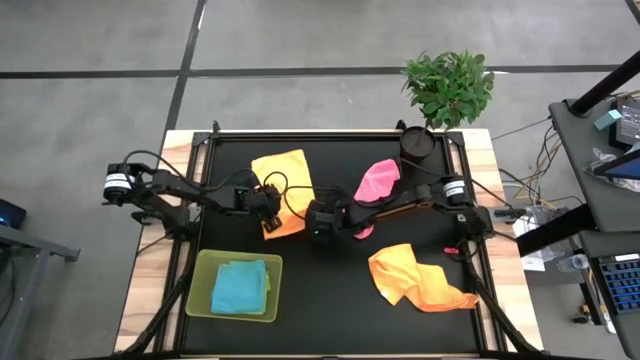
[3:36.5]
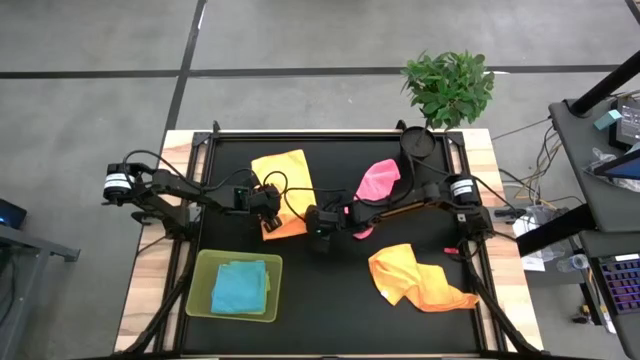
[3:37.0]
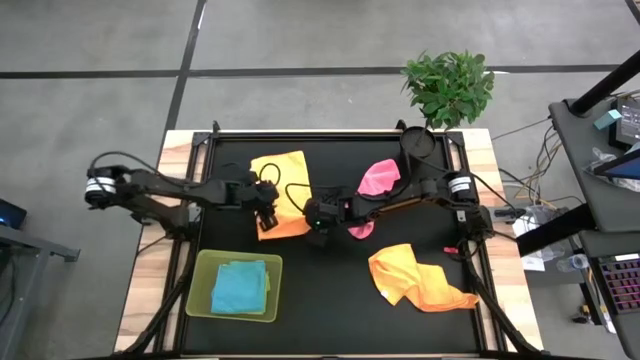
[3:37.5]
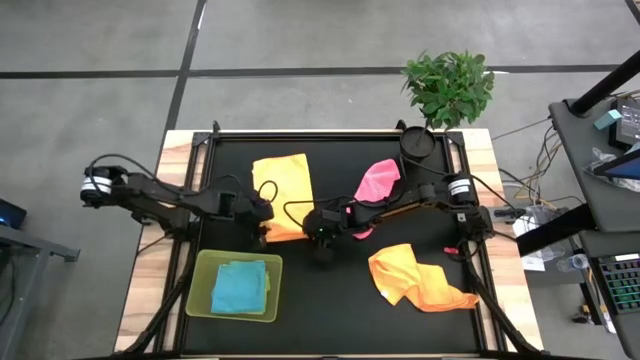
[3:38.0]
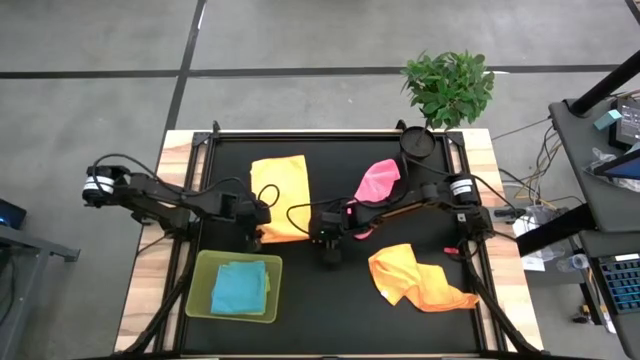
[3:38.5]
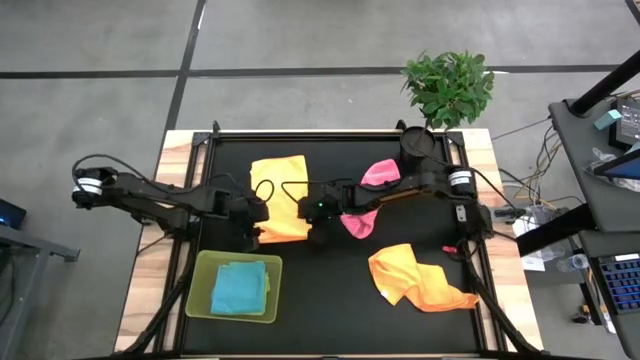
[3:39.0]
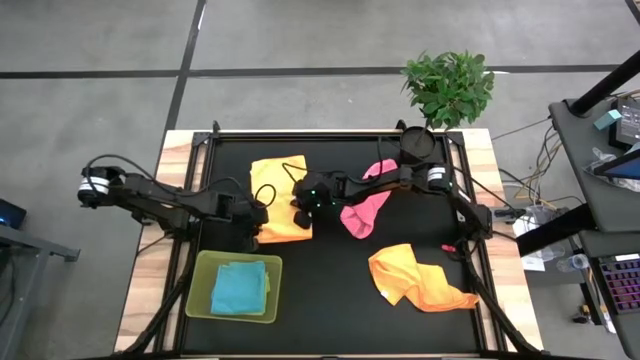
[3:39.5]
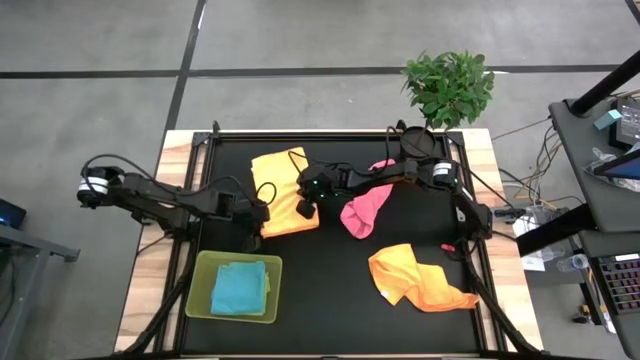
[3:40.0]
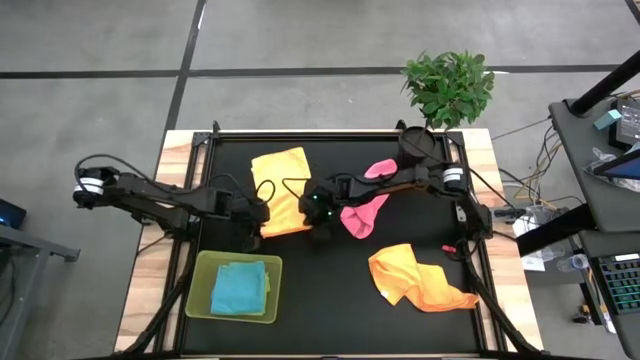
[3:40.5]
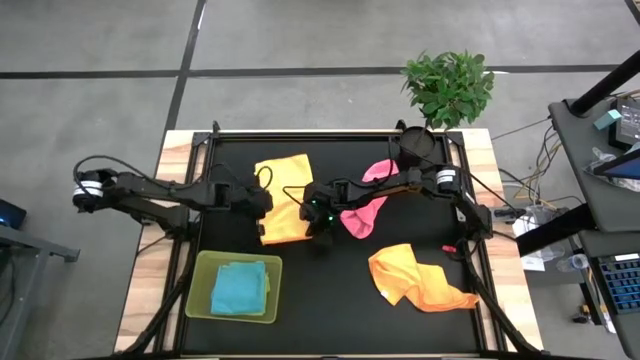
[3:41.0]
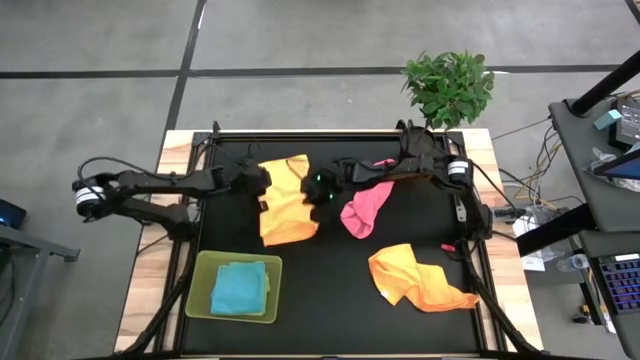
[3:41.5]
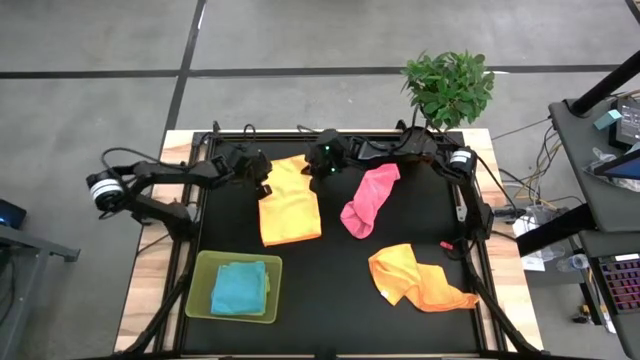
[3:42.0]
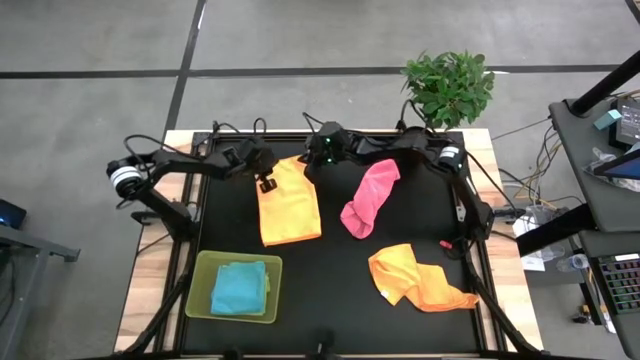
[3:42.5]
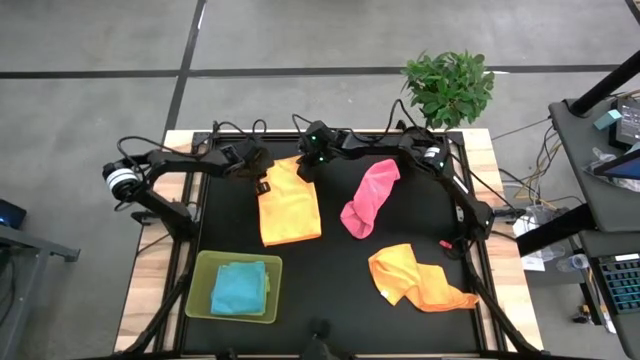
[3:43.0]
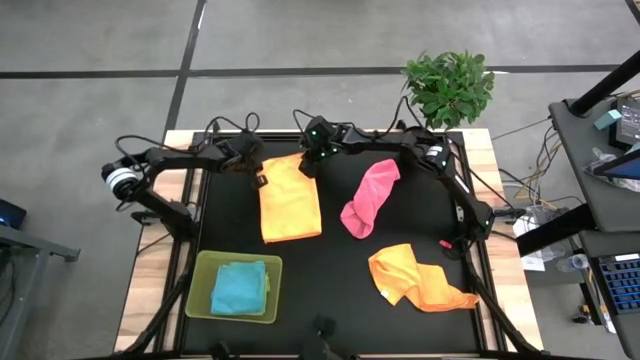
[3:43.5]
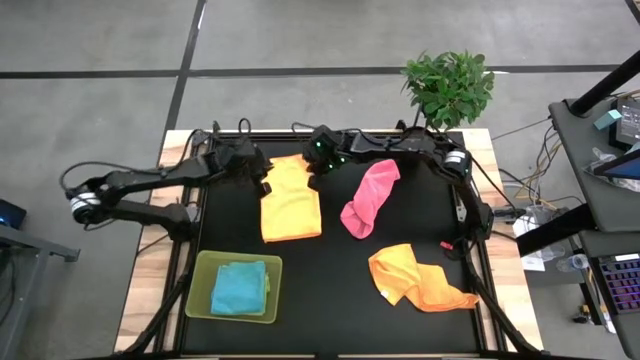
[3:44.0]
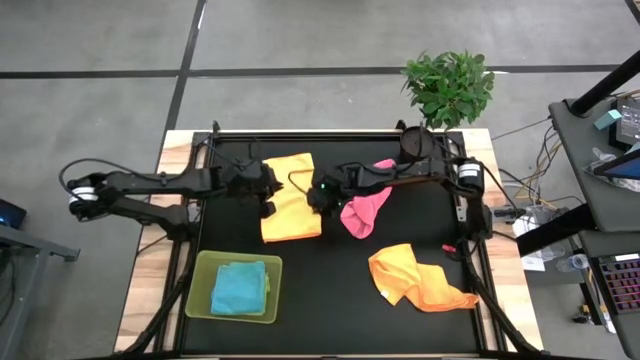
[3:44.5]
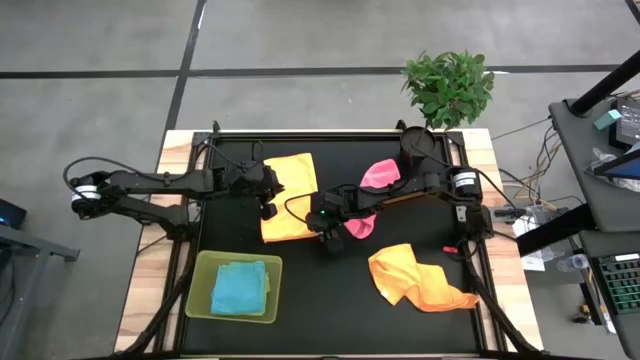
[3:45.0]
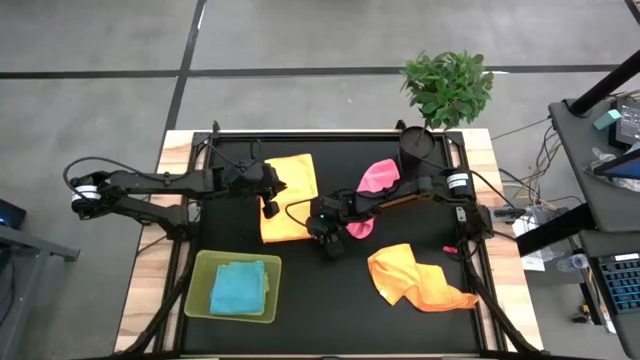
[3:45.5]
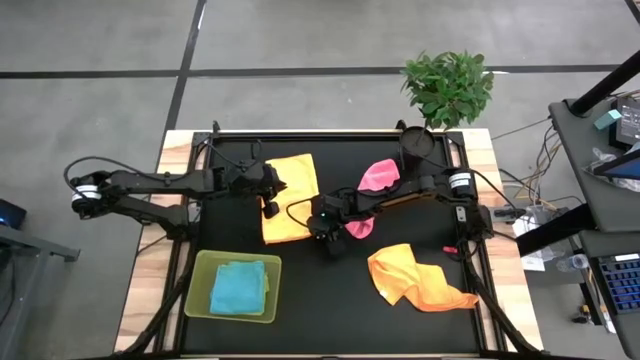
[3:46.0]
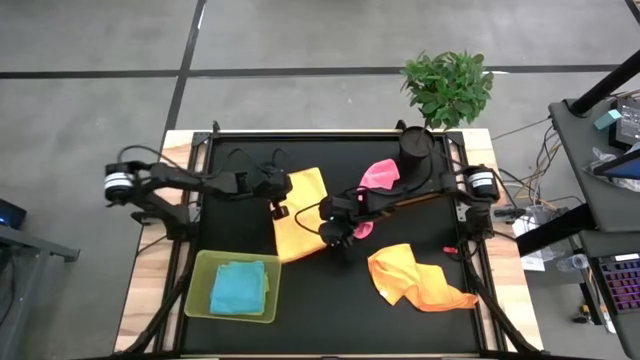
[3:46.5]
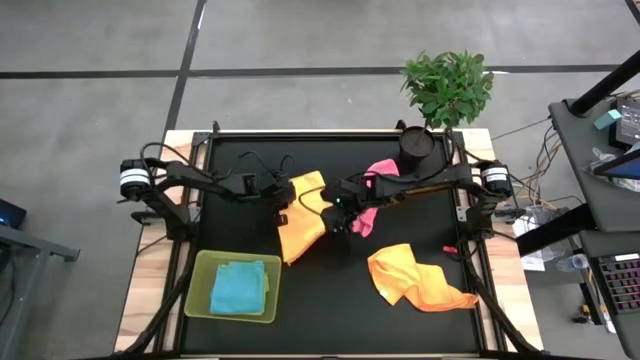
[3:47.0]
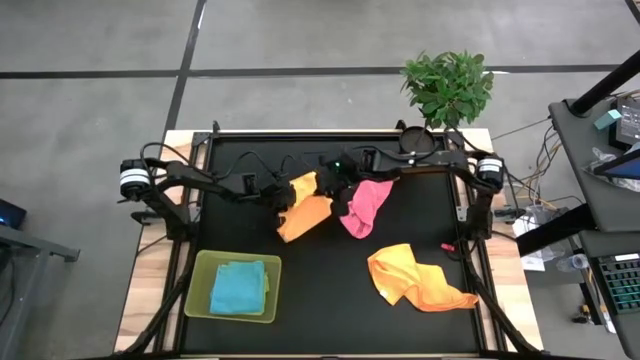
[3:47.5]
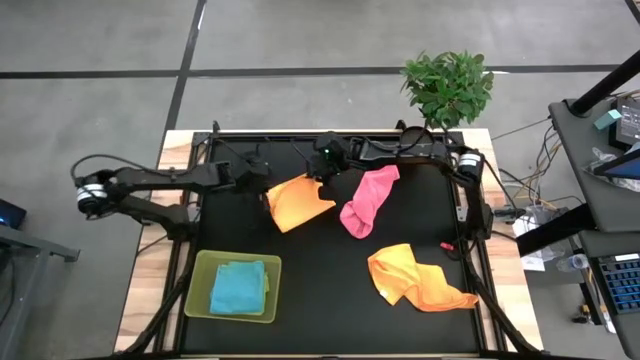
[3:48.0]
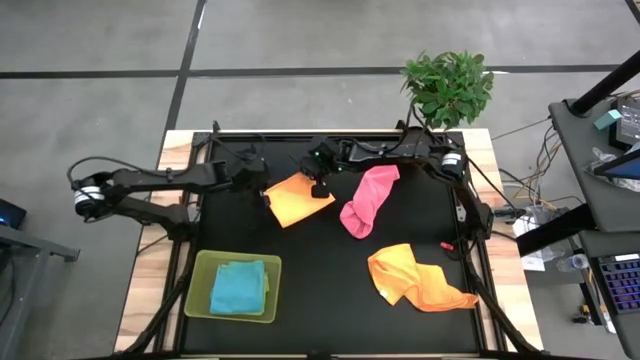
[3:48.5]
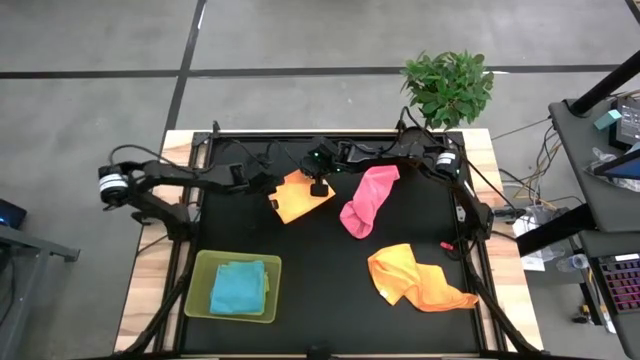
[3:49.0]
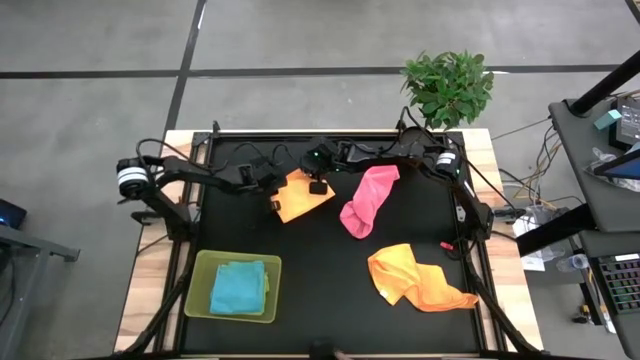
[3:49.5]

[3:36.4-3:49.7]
Task: Fold microfiber towels
Fold the top orange microfiber towel

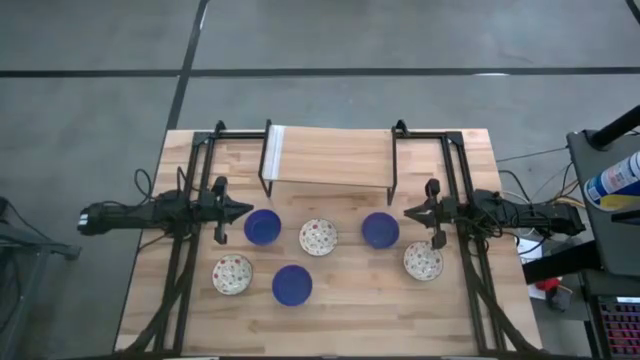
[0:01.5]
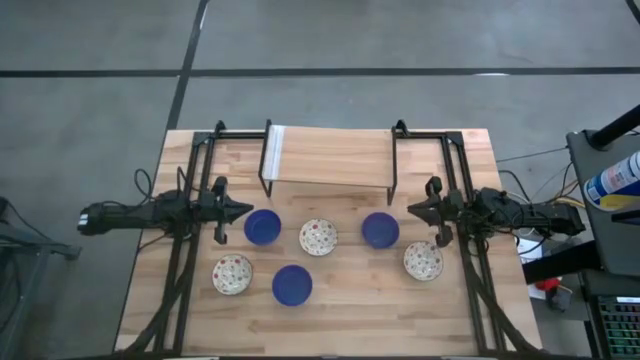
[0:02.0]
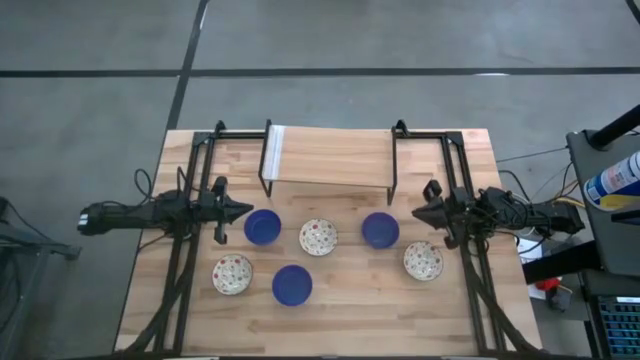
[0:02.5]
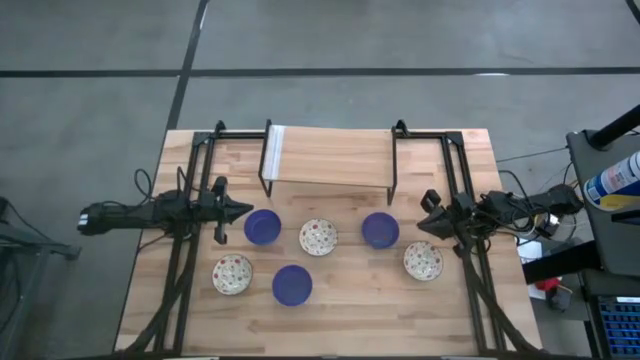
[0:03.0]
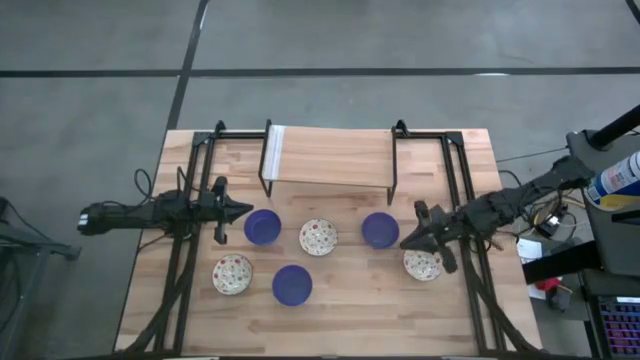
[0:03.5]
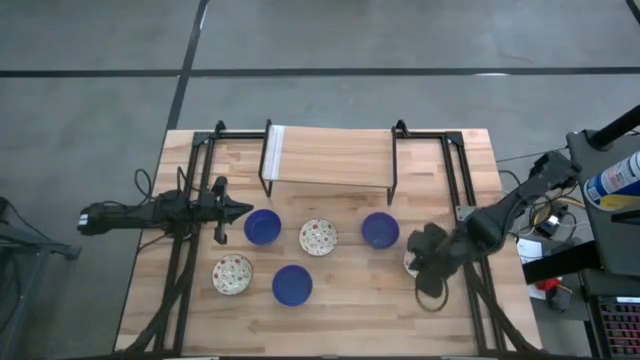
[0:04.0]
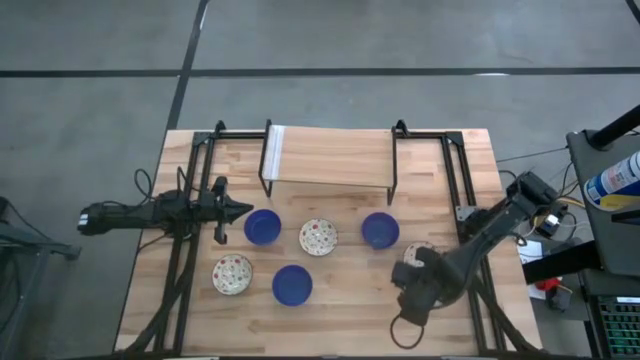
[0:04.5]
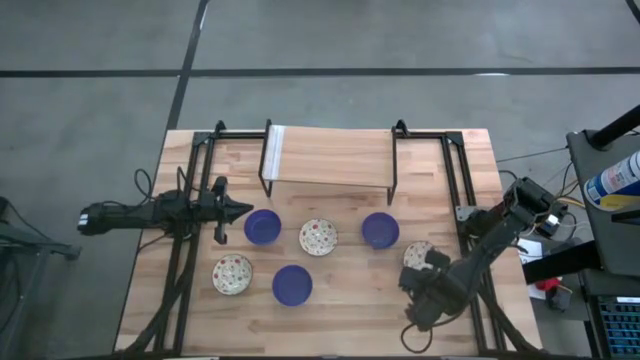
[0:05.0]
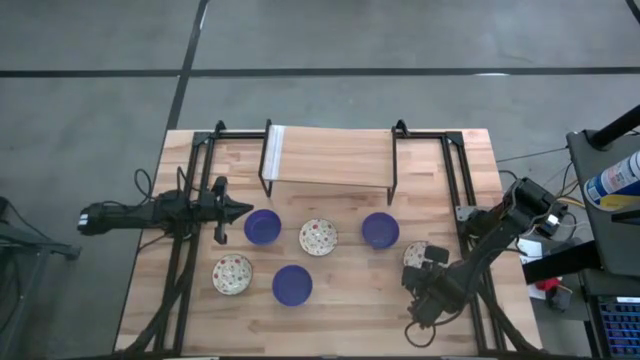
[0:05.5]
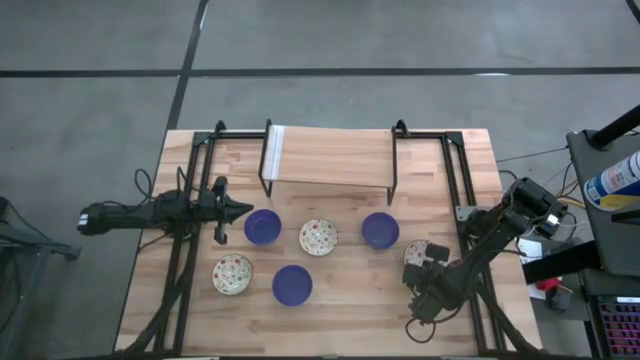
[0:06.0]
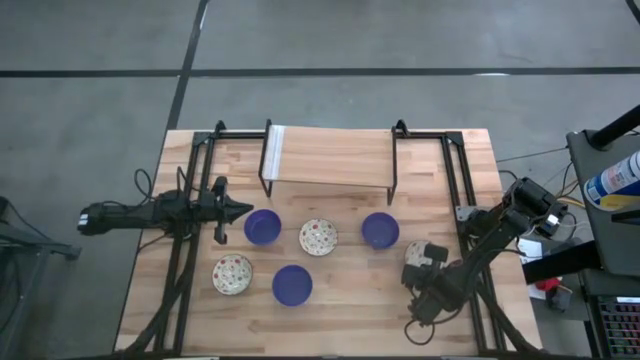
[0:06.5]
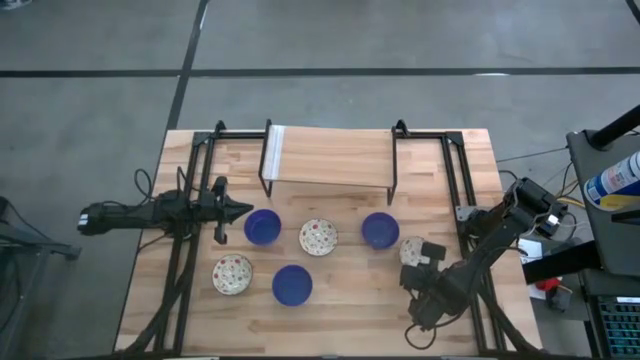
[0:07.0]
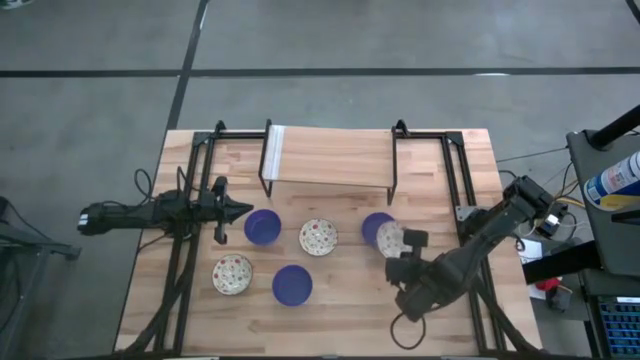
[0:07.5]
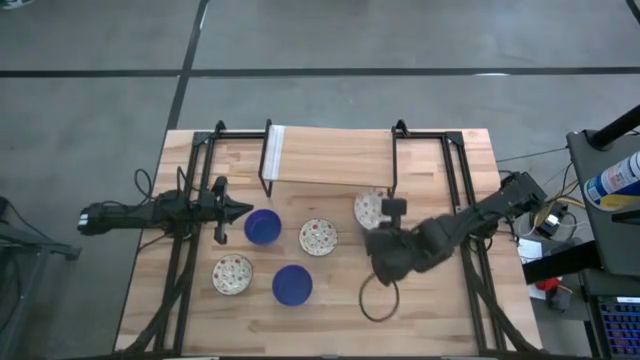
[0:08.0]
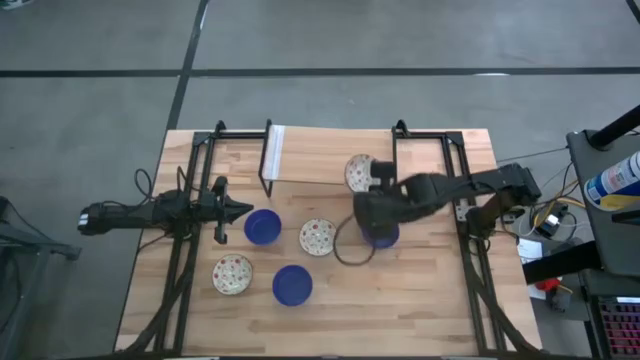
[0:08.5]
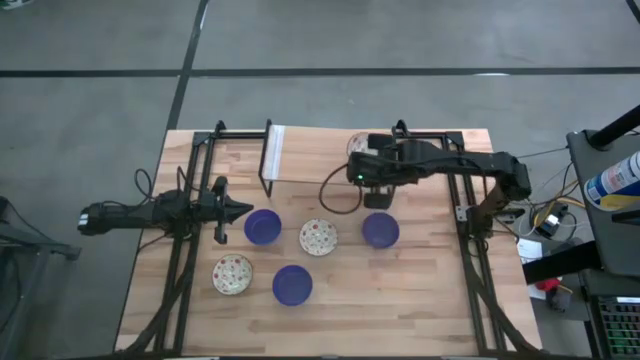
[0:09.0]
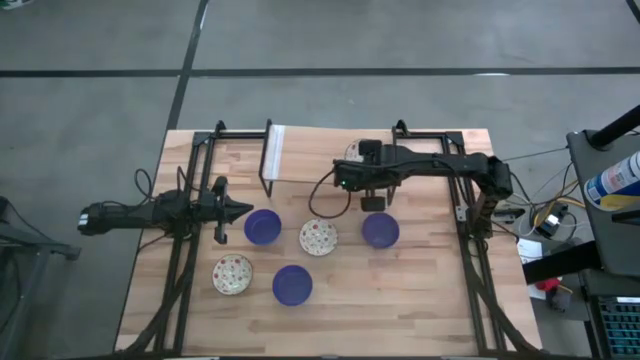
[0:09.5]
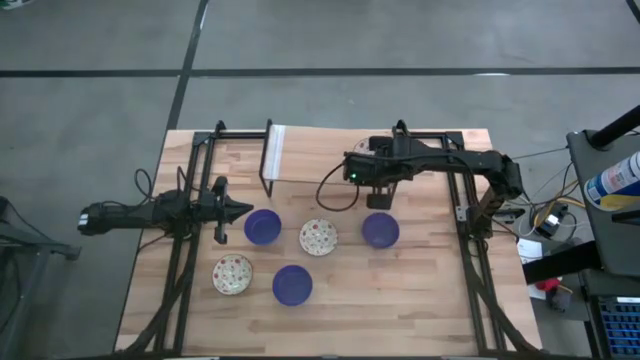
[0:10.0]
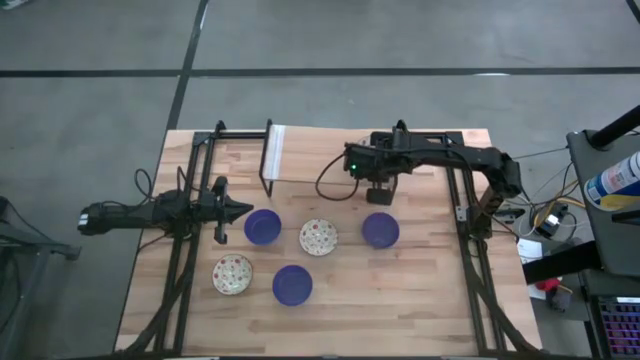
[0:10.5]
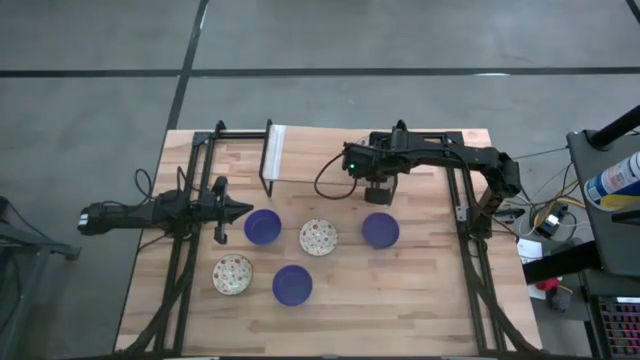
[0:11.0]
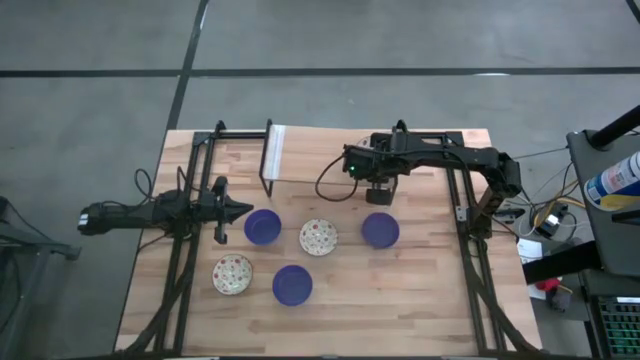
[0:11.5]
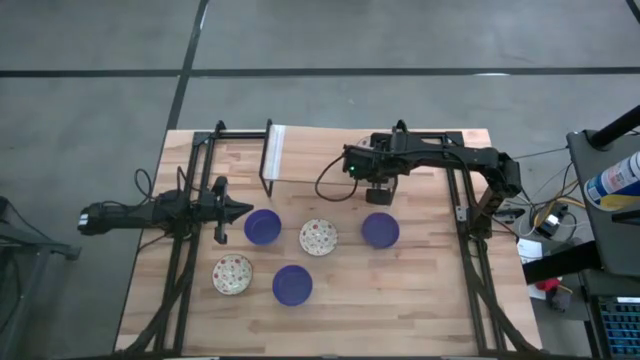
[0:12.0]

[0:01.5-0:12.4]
Task: Pick & Place Mini bowls
Put the right white patterned bowl on the shelf
